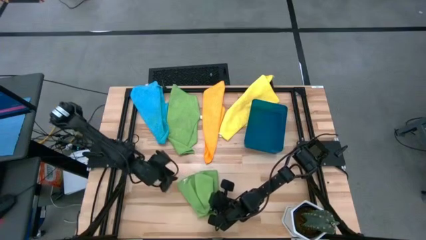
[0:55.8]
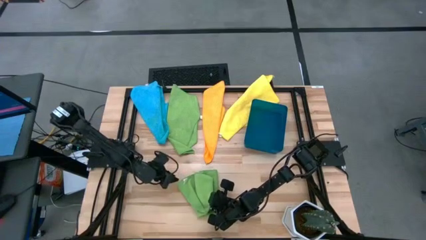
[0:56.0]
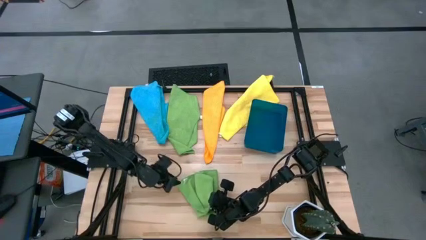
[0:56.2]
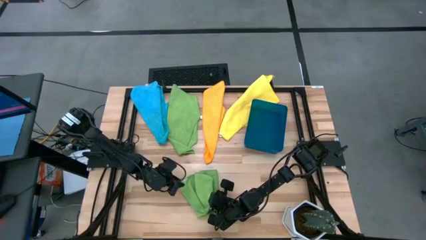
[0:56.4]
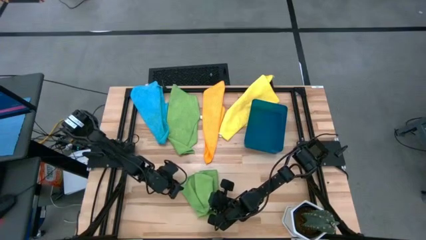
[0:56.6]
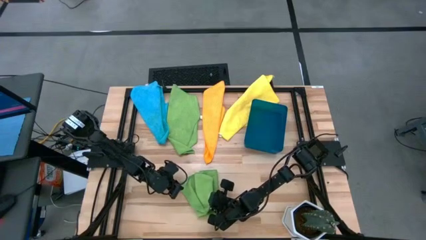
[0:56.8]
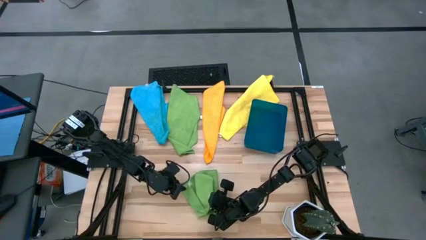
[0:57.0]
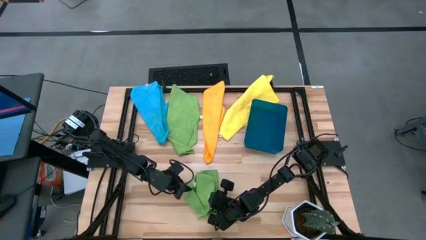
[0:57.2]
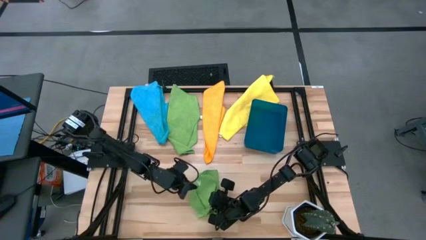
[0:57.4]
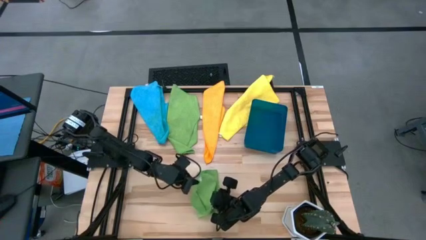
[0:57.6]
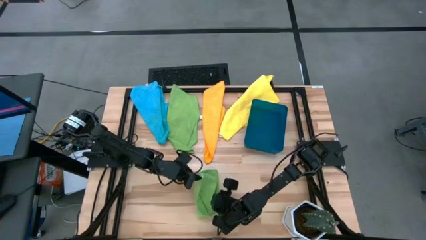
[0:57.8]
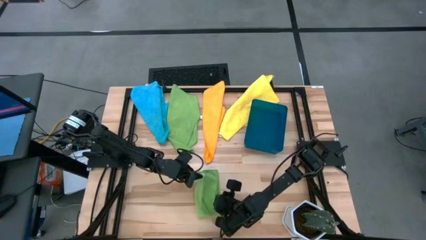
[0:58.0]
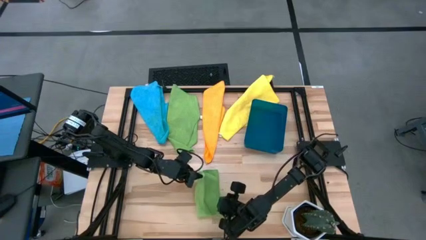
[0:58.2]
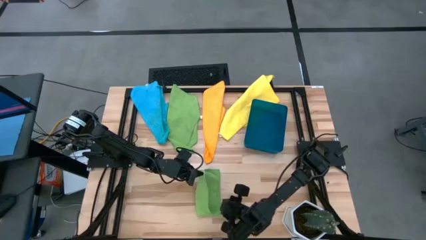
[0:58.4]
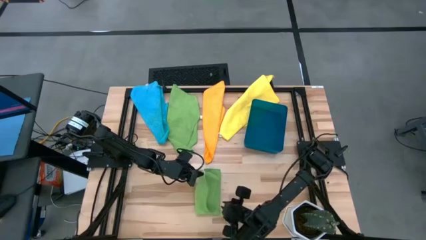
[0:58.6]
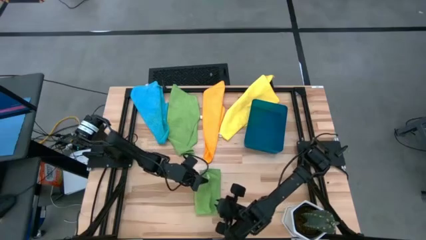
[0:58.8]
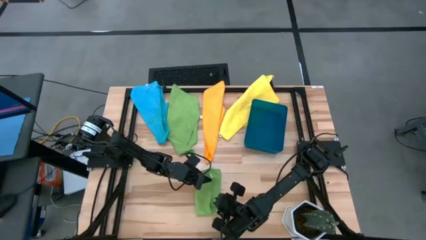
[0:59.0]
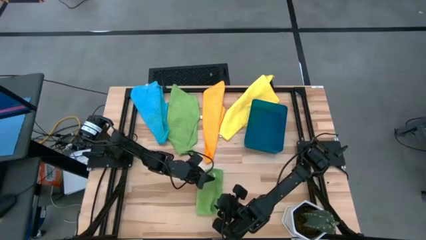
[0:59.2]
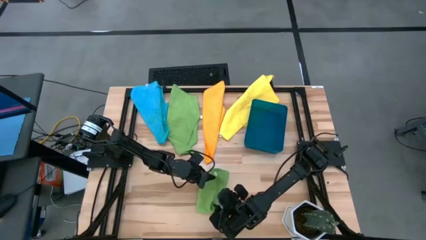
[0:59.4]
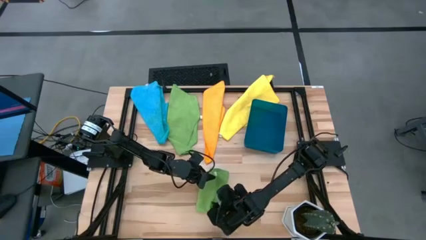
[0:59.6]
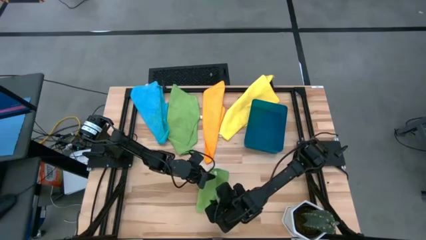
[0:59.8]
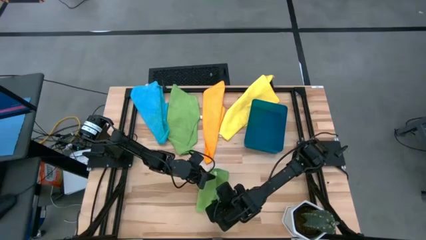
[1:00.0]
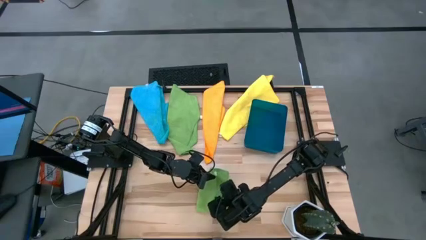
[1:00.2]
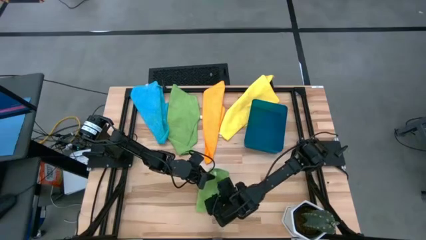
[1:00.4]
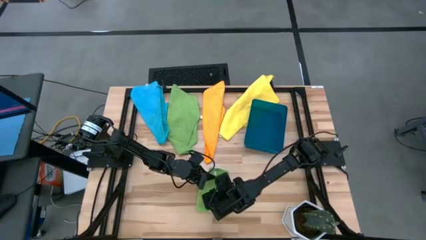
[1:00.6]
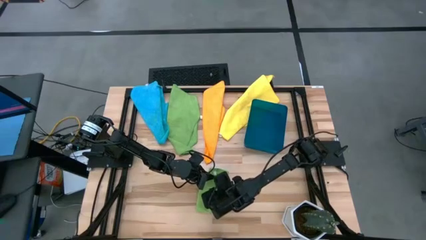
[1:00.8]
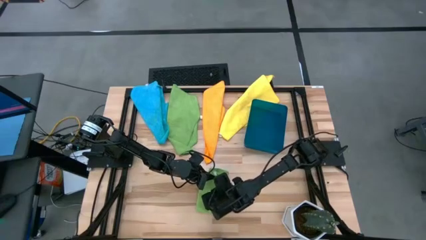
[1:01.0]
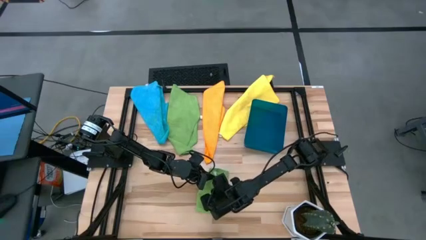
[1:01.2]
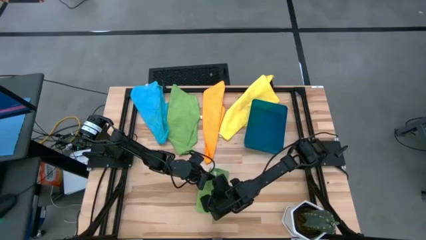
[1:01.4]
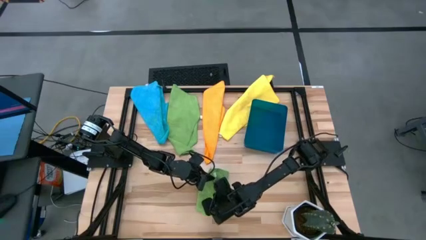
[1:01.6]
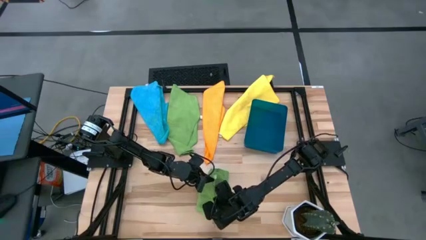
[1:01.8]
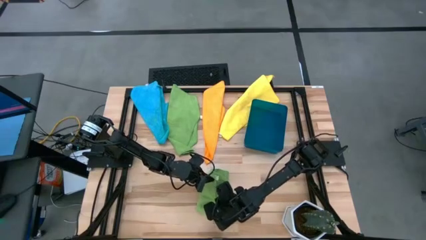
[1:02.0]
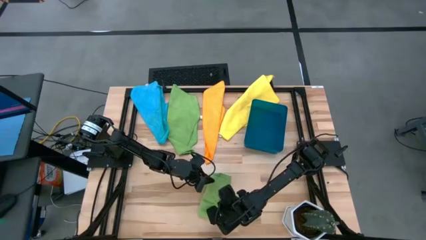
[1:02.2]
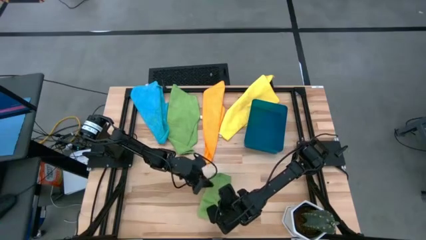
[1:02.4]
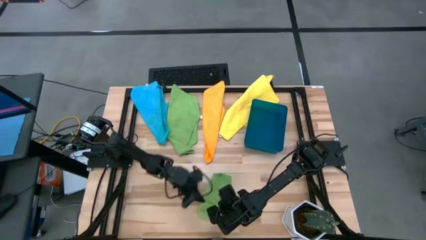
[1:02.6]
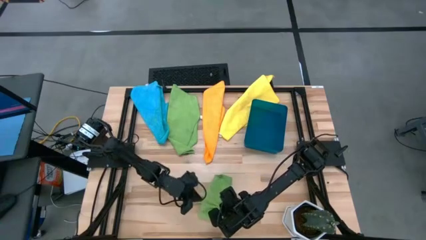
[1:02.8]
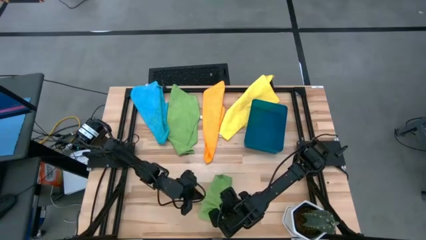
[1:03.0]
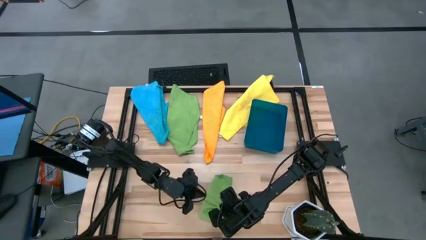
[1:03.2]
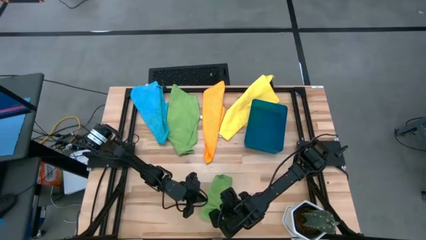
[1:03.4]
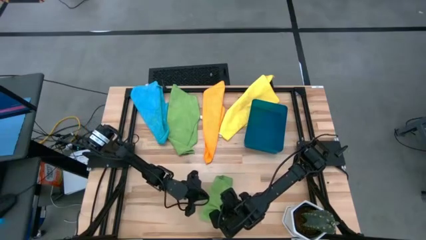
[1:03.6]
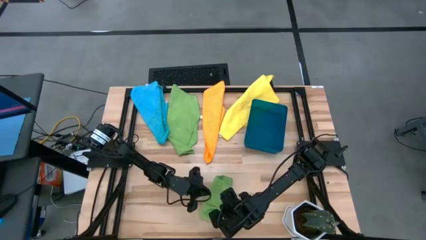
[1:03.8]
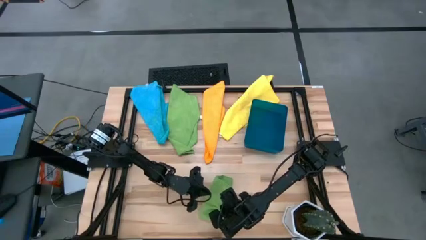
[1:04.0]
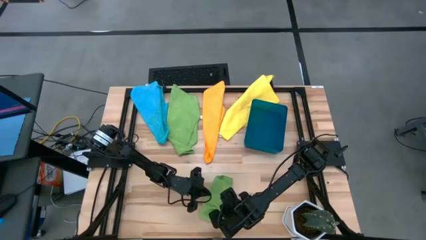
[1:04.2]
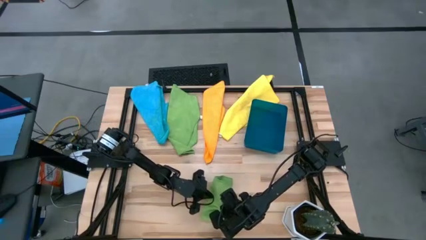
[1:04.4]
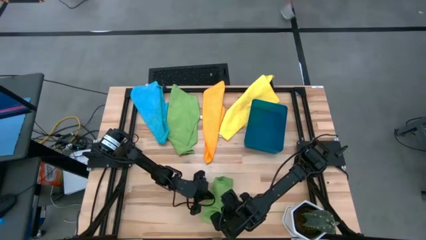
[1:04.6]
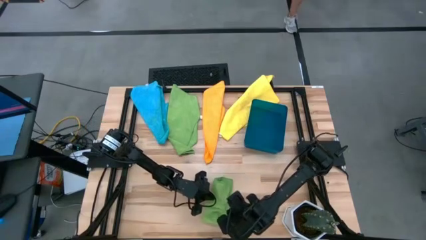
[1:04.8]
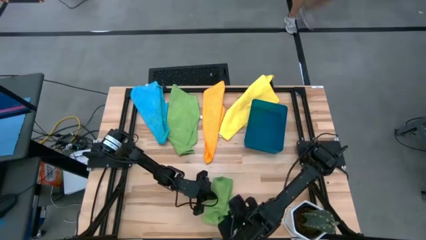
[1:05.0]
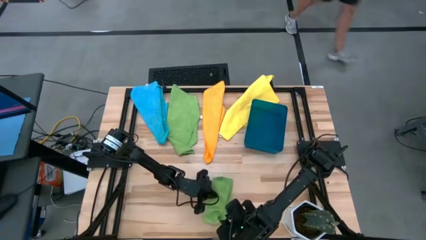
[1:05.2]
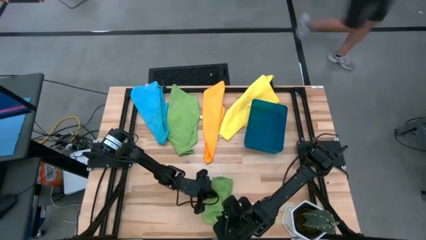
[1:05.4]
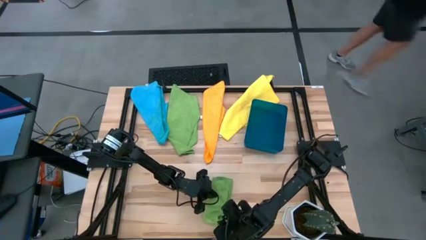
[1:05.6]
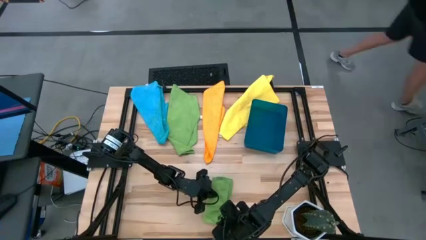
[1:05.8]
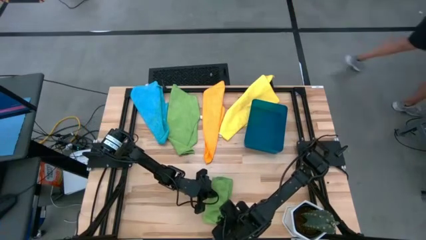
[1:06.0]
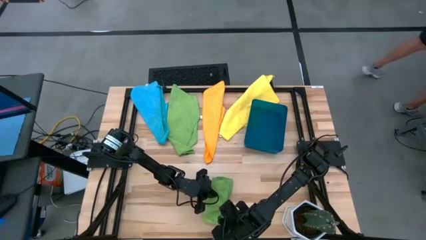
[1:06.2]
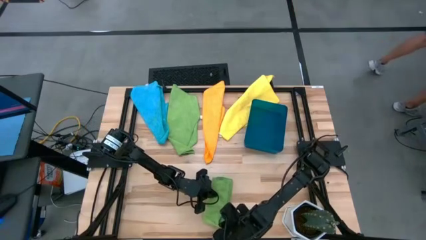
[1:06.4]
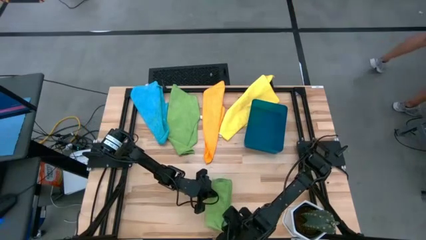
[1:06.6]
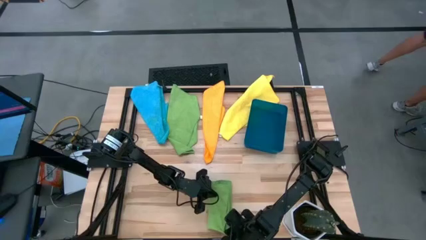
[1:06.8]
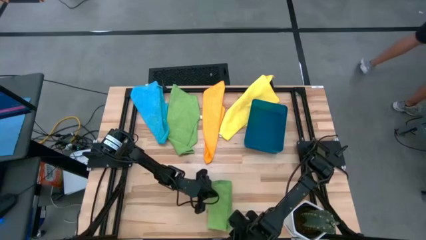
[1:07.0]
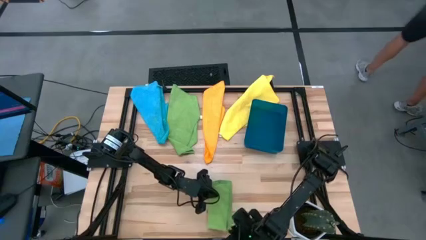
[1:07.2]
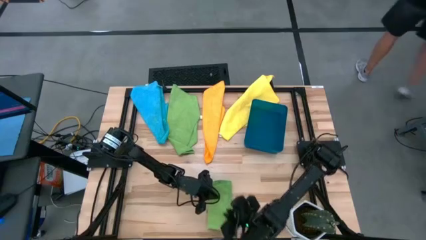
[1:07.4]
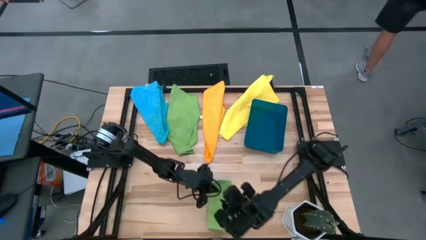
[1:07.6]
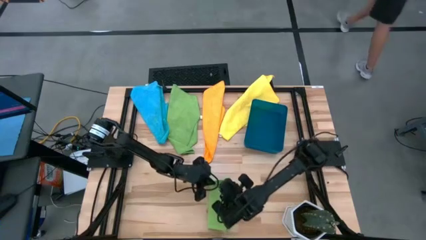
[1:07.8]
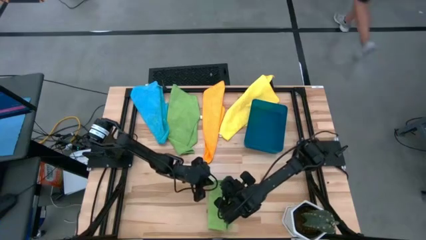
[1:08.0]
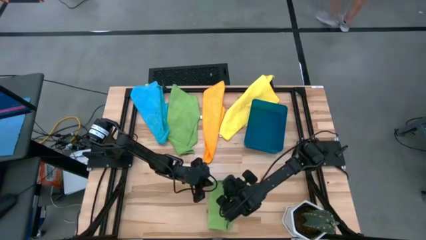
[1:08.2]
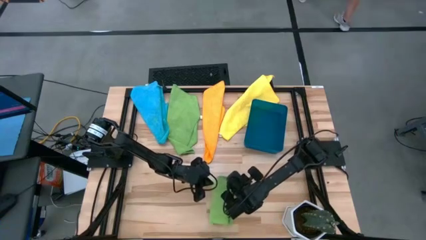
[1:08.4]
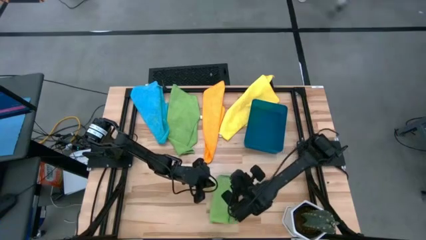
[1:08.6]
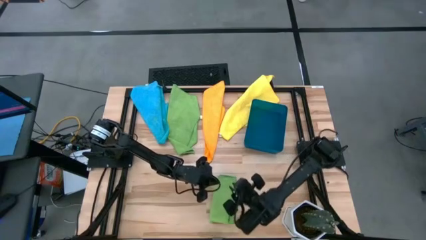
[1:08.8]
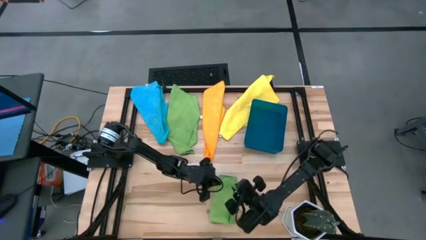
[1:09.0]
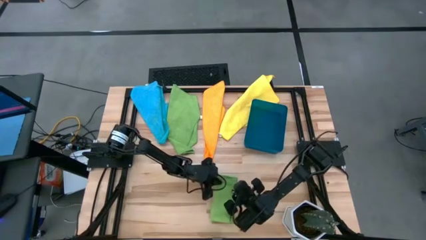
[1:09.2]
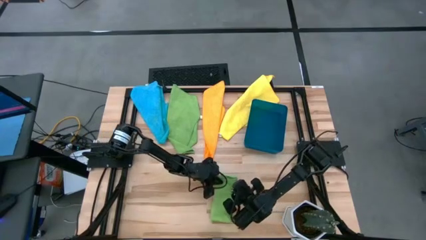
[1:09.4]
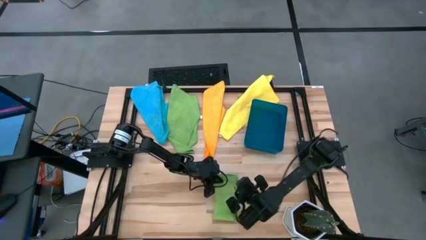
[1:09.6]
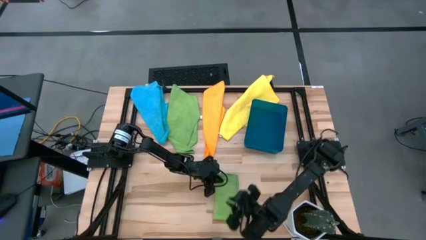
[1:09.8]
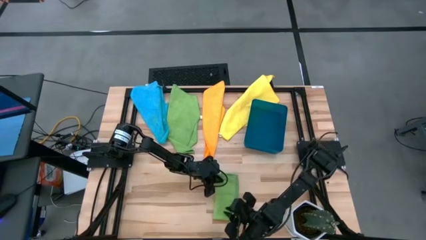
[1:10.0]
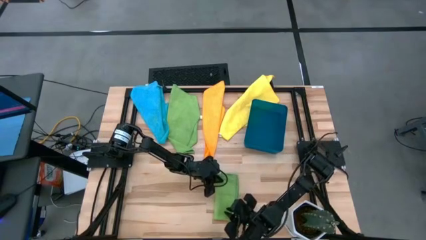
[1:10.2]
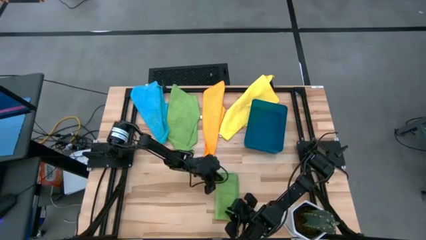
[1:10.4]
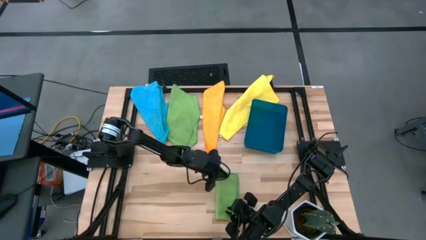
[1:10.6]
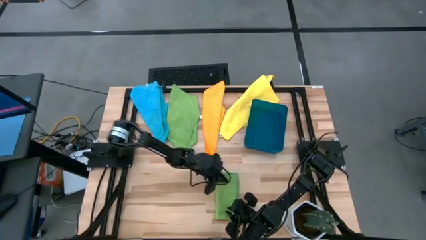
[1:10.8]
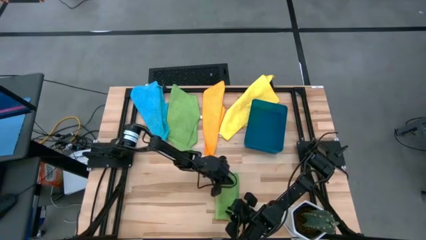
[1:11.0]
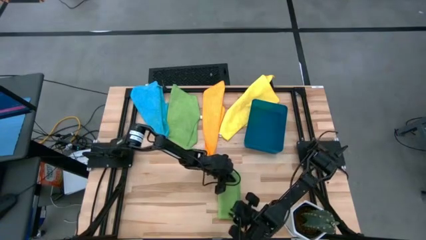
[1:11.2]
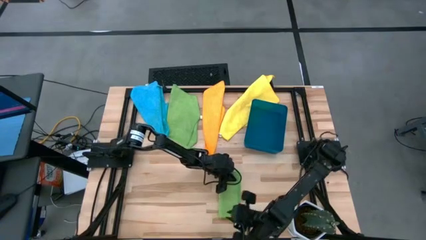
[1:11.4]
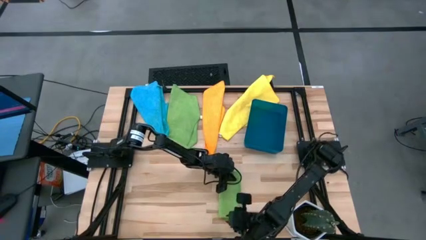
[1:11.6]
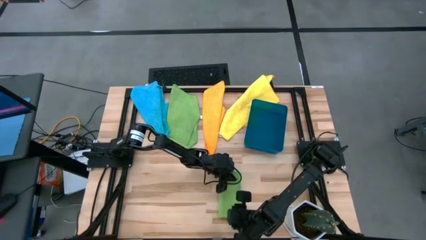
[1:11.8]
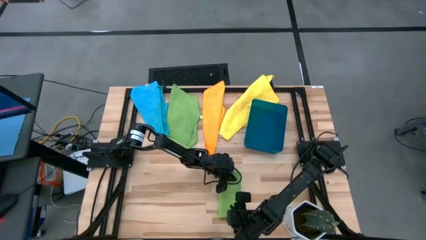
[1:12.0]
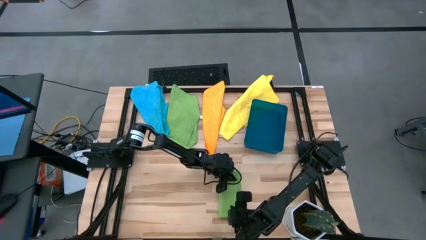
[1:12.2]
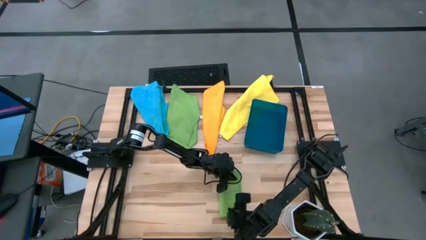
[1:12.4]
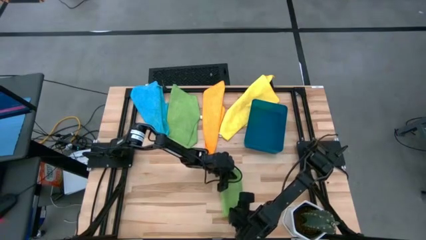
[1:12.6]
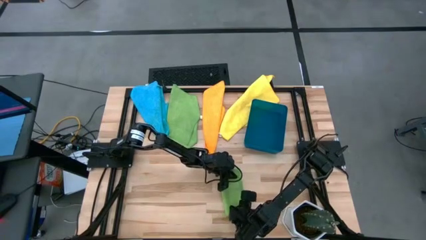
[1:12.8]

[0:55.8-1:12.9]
Task: Fold microfiber towels
Fold the bottom green microfiber cloth
